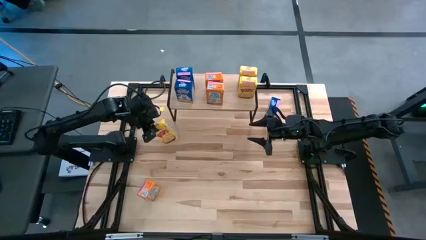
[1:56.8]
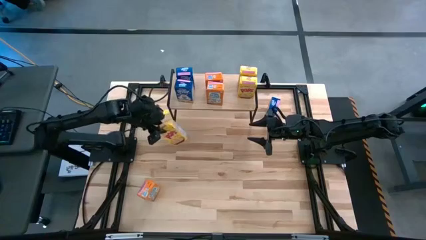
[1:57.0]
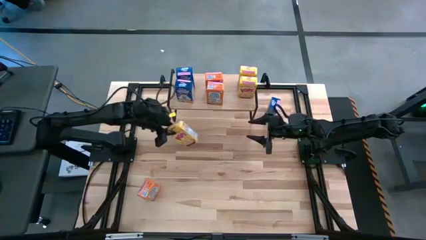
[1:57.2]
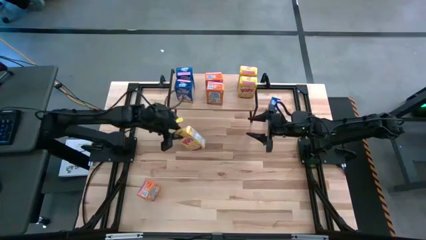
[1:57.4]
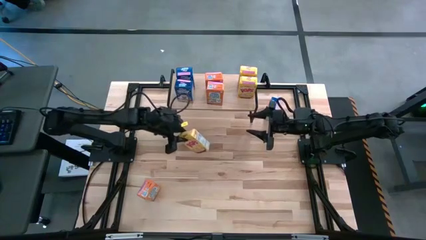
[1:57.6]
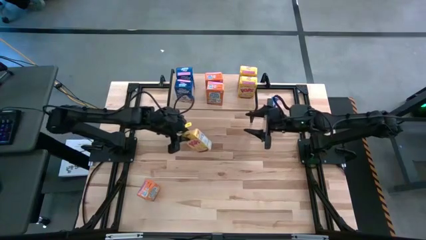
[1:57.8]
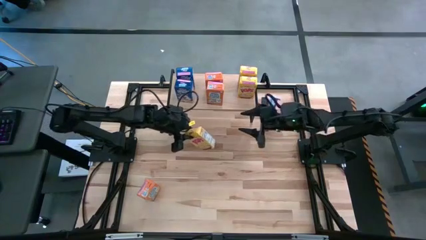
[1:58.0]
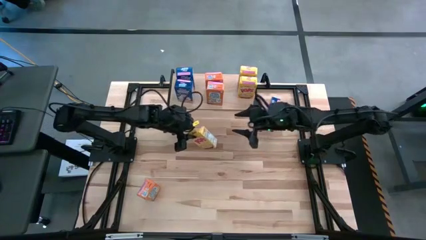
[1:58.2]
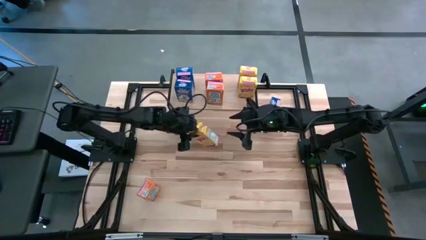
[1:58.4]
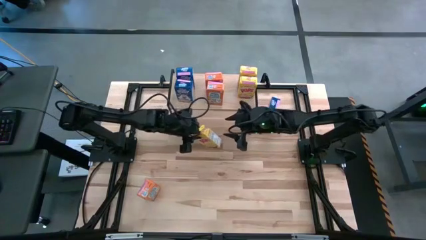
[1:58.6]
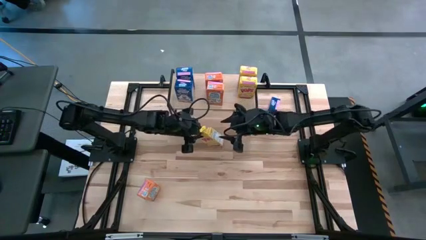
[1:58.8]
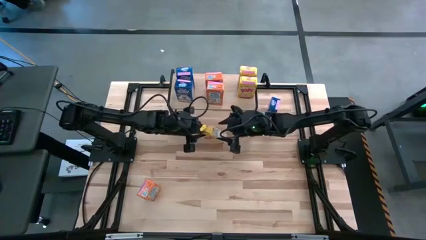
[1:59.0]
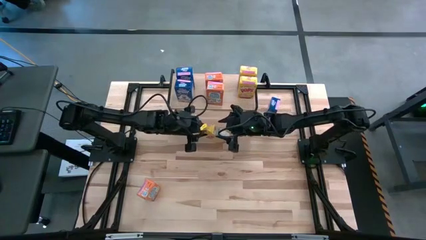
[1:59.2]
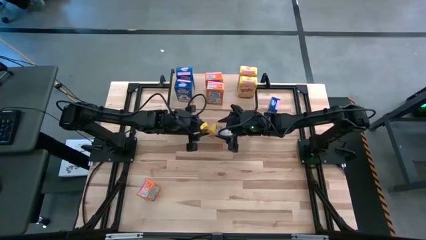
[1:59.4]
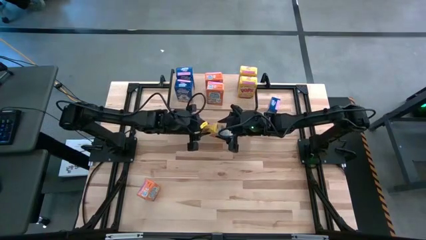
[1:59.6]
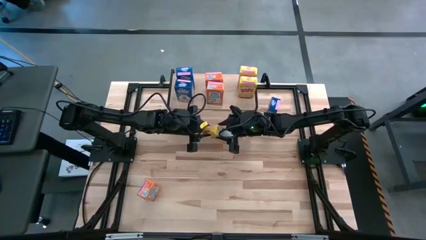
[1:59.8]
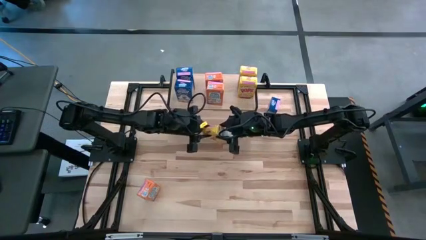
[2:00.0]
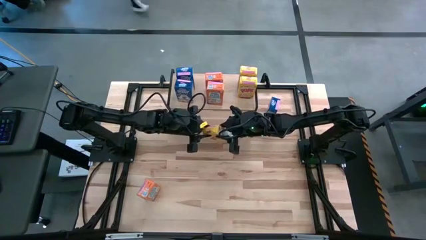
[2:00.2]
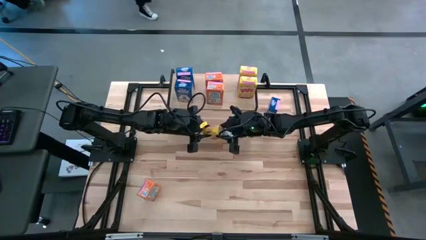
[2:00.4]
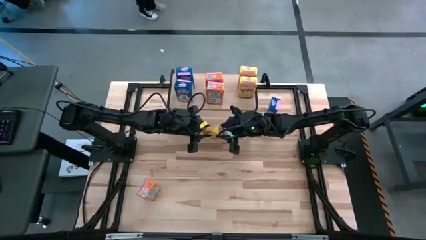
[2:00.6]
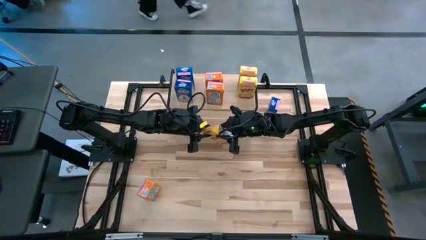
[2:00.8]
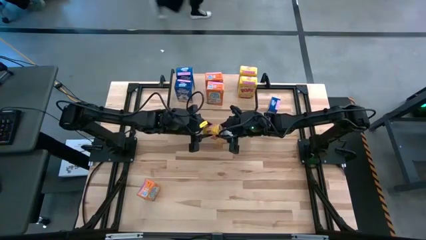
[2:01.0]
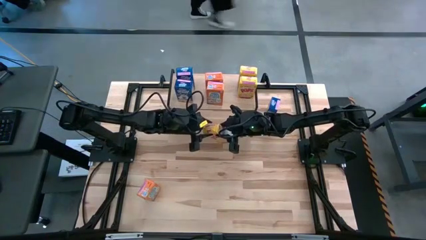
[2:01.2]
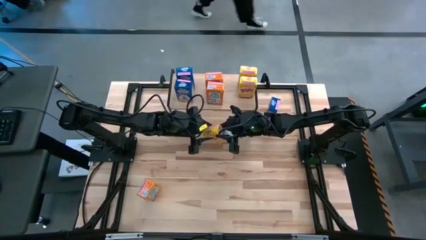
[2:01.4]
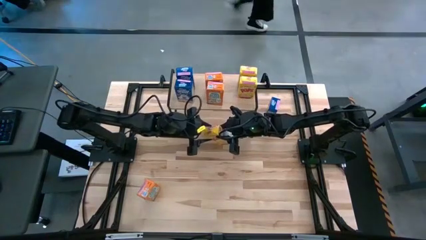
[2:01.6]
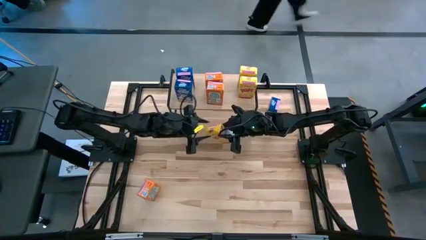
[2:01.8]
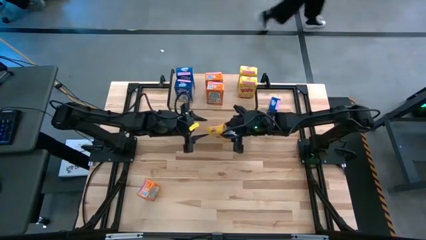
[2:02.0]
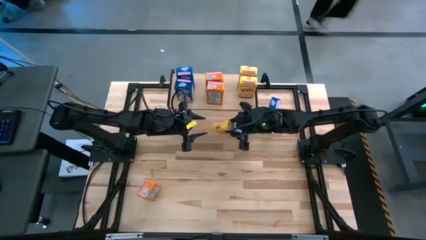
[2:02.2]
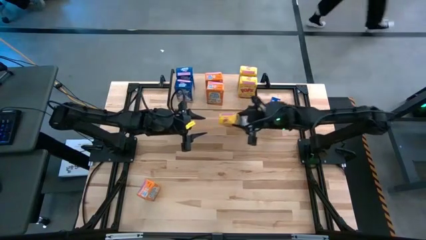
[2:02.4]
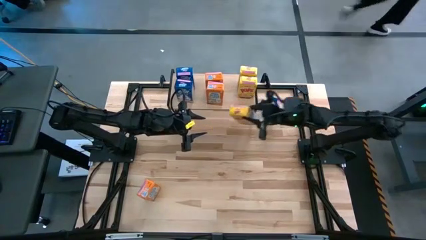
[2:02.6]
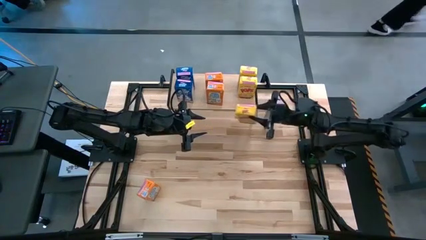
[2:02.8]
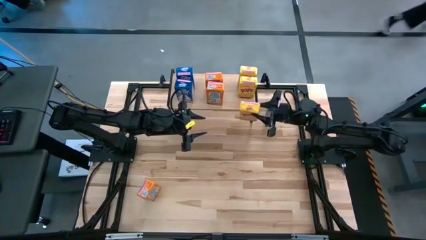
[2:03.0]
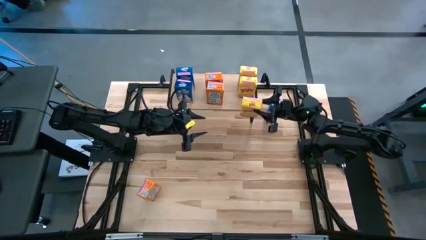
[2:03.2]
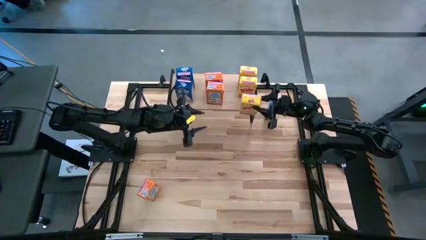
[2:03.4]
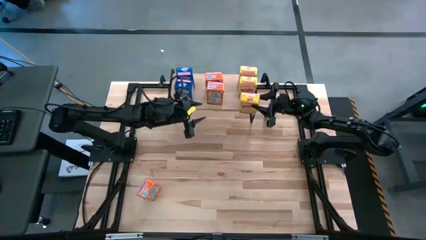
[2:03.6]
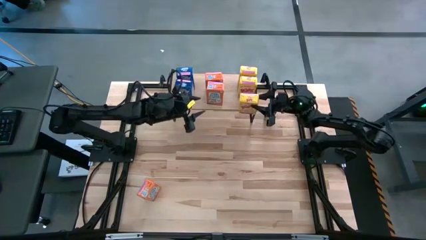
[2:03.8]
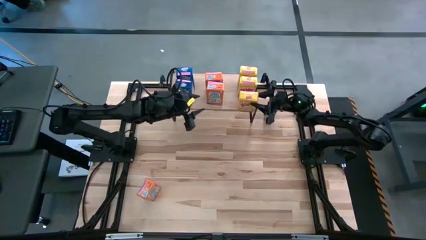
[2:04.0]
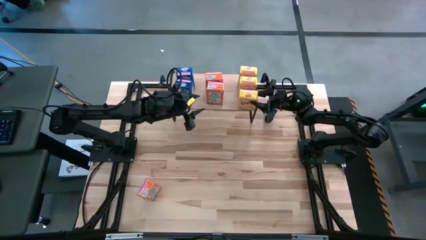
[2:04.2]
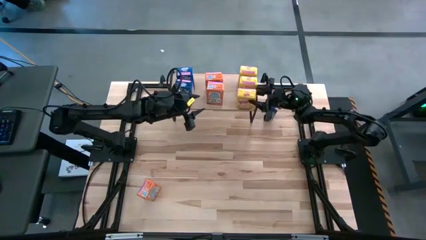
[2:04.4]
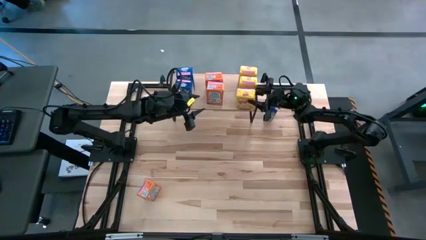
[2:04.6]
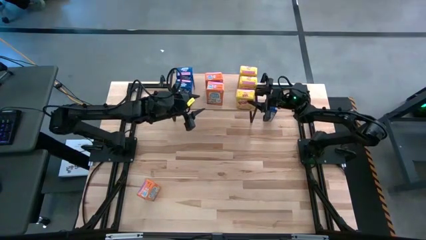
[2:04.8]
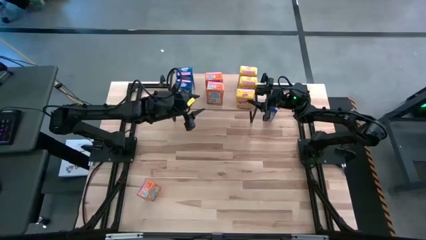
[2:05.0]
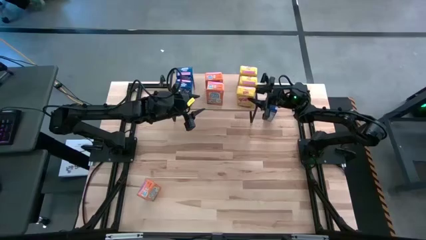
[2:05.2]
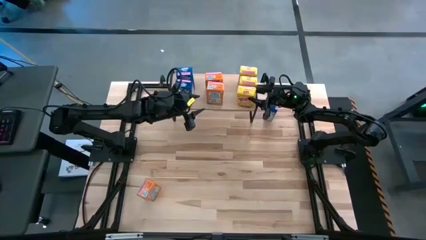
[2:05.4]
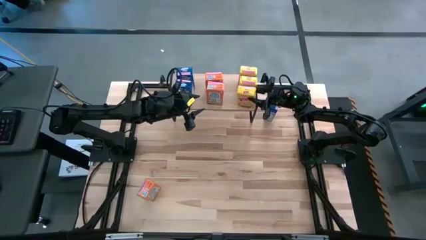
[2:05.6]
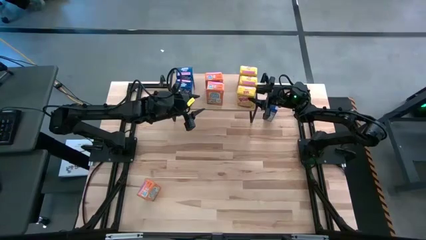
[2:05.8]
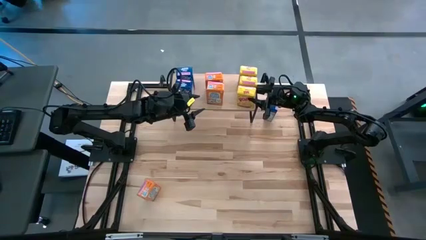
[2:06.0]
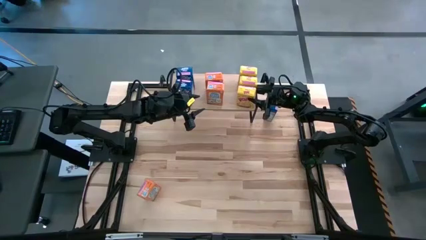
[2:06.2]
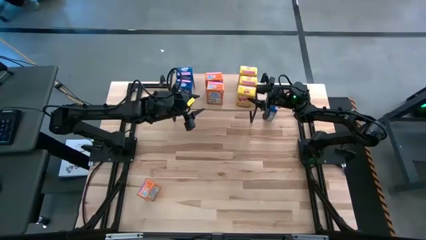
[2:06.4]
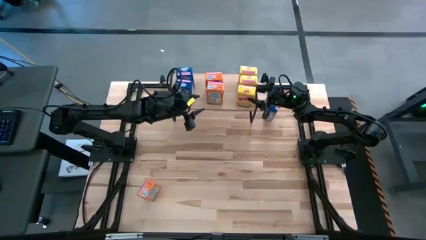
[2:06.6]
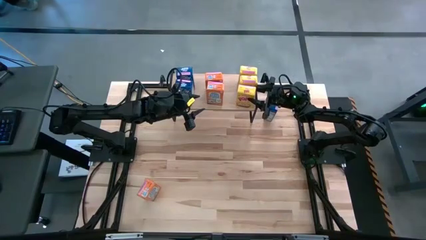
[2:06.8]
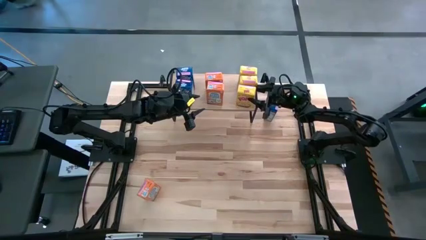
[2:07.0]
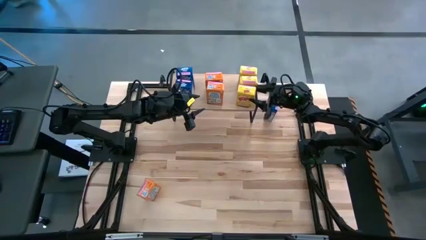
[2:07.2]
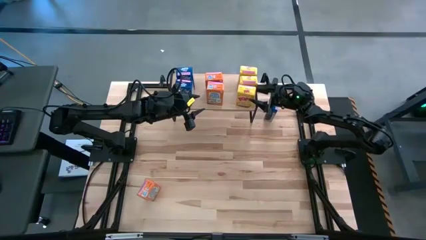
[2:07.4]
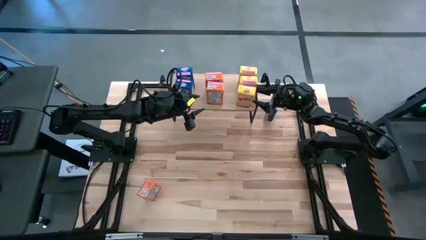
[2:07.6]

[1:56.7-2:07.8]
Task: Stack cereal on shelf
Put the yellow cereal box aligned with the other yellow cereal boxes on the shelf

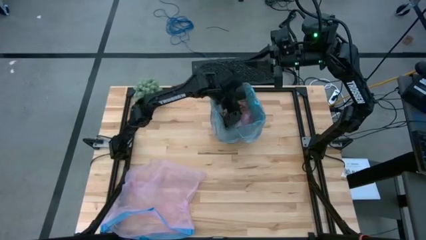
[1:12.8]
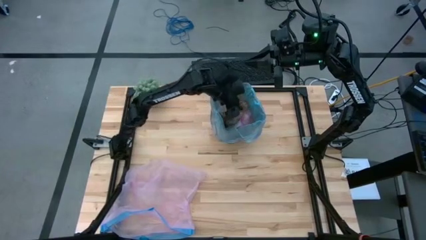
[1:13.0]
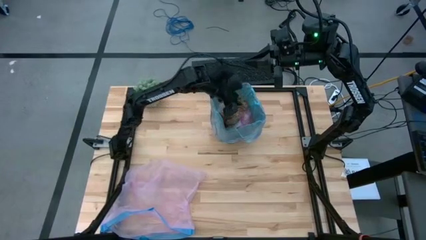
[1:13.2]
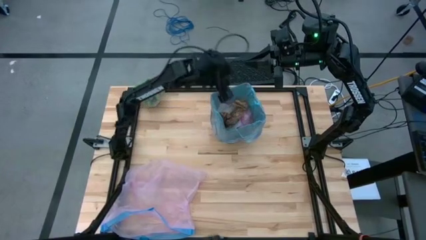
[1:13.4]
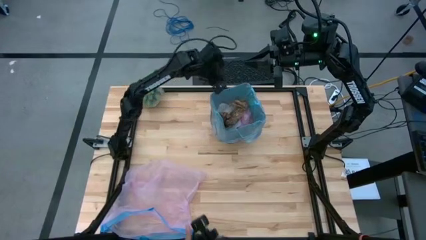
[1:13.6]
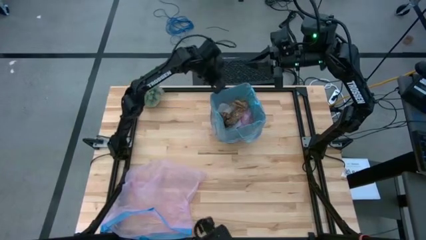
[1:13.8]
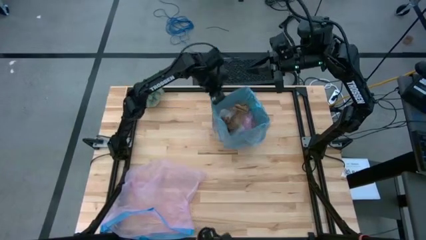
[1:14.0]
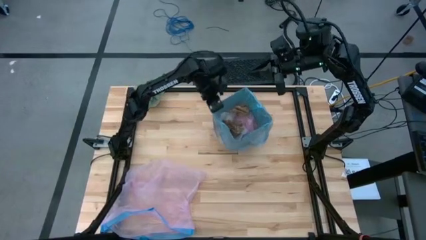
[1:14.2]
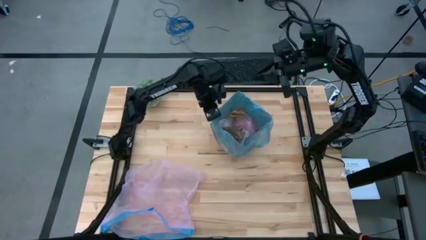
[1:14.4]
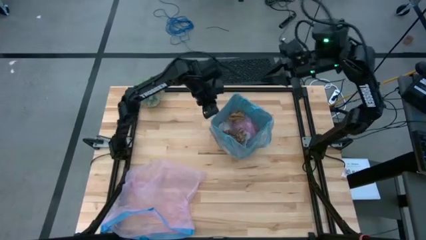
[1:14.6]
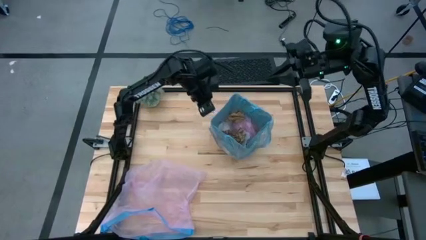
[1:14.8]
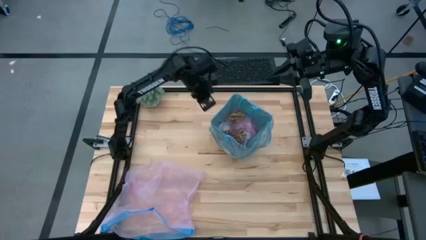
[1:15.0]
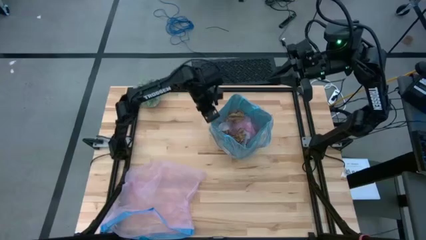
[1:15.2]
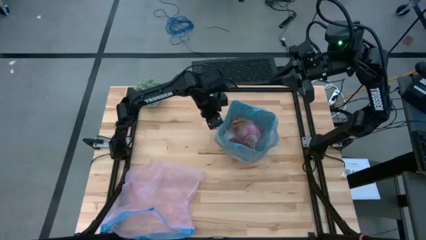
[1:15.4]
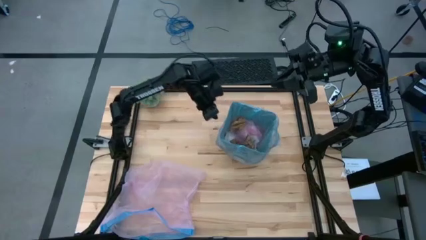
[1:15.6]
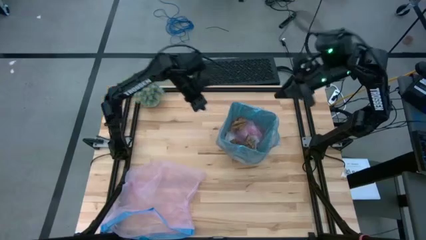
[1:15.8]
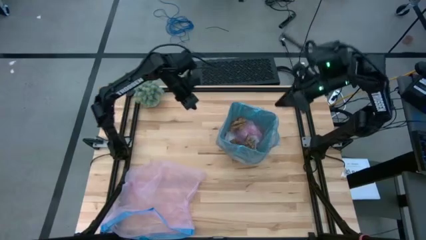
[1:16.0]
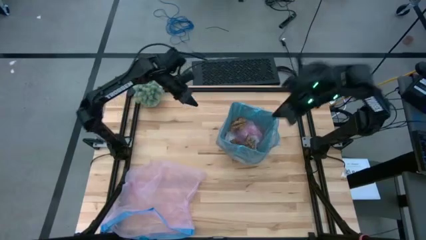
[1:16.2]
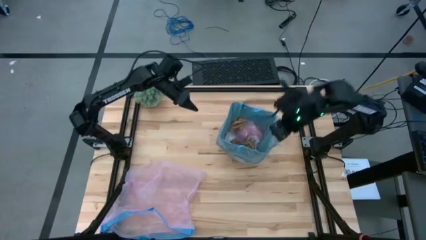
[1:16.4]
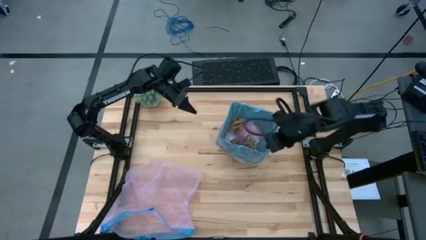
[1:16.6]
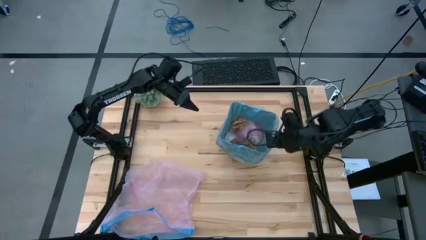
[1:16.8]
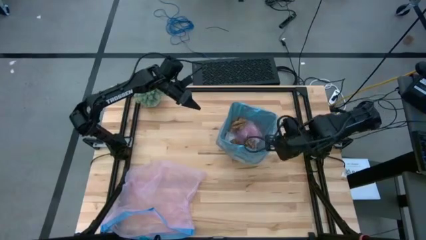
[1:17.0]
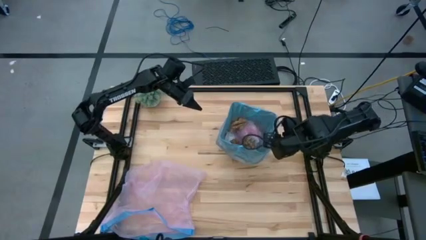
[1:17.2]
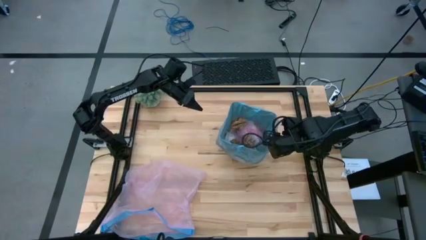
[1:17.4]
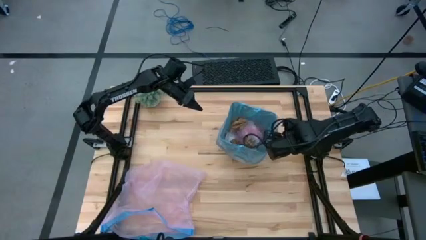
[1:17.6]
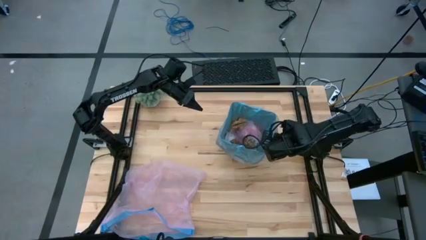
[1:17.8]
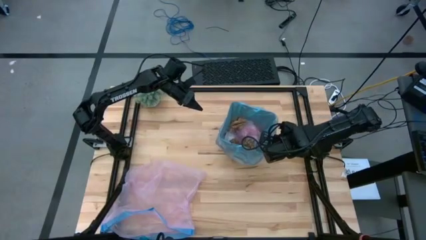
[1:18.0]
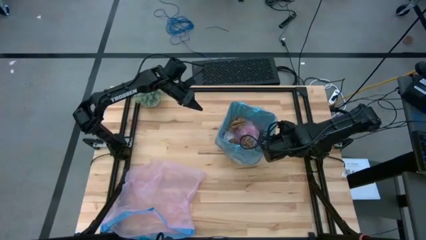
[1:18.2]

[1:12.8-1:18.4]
Task: place trash/remove bag and relplace
Remove the blue trash bag from the trash bin
